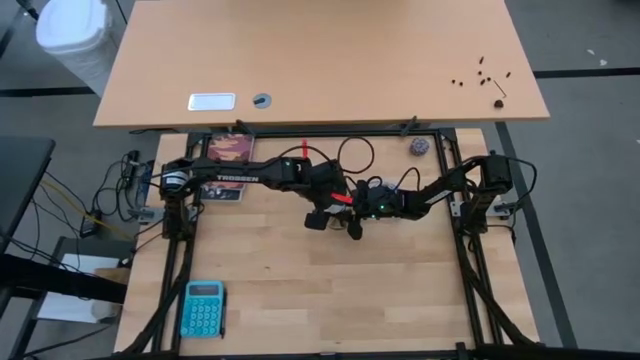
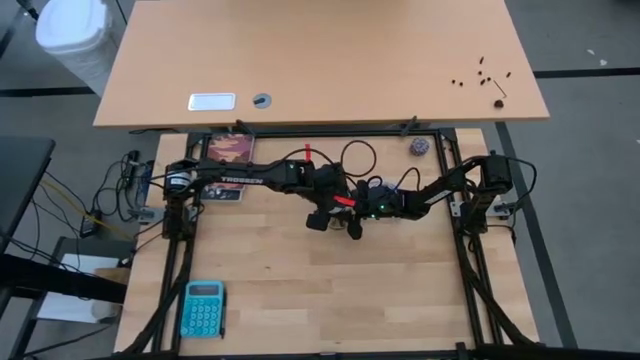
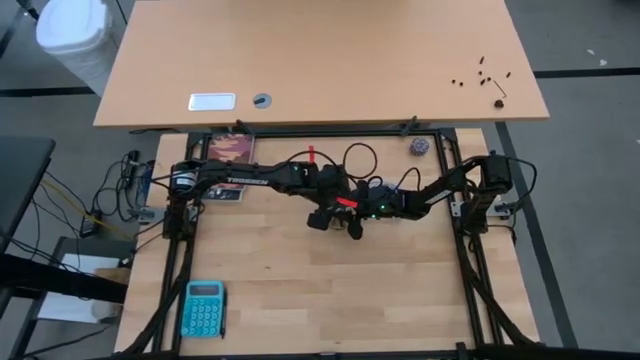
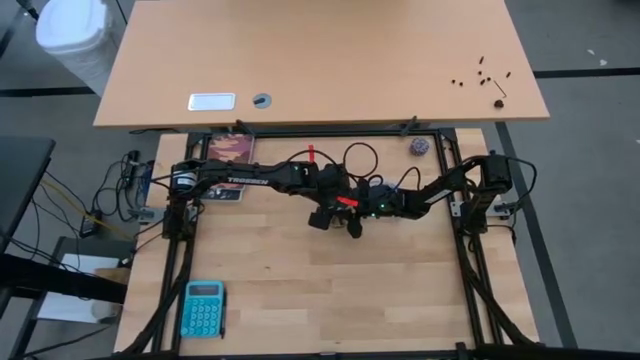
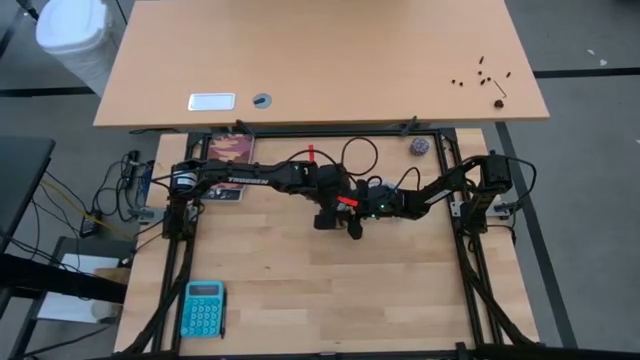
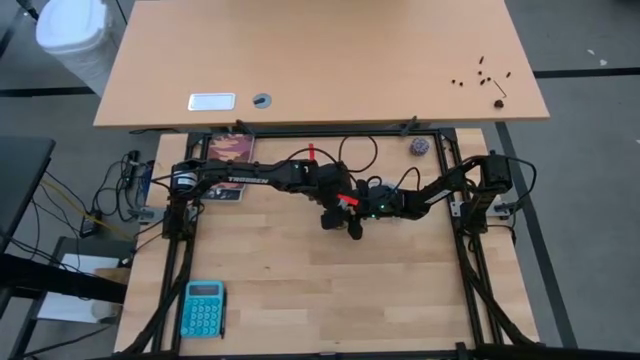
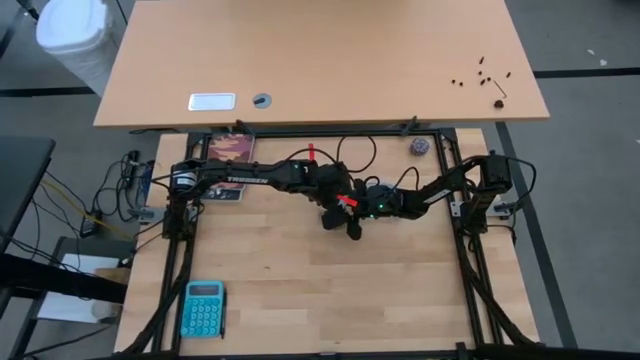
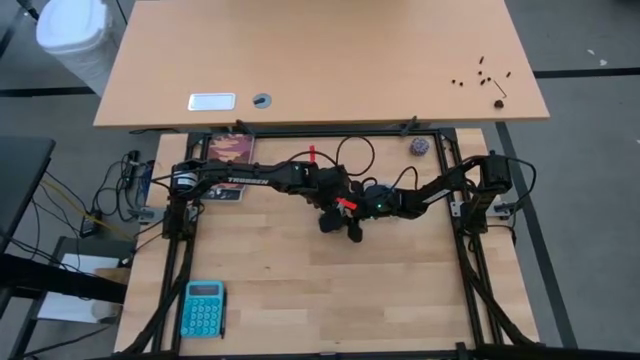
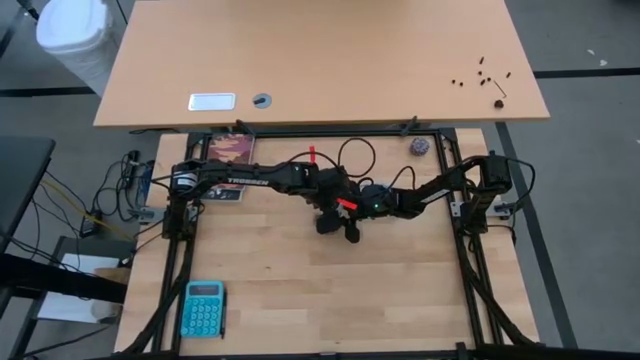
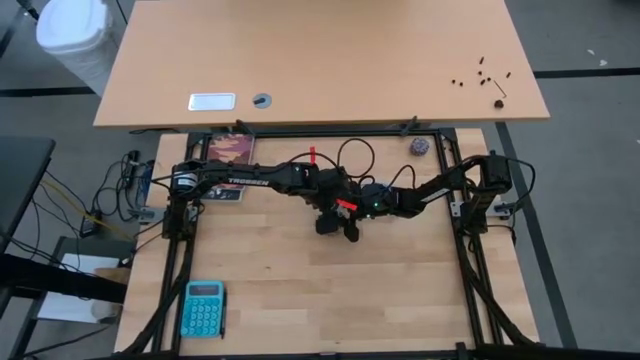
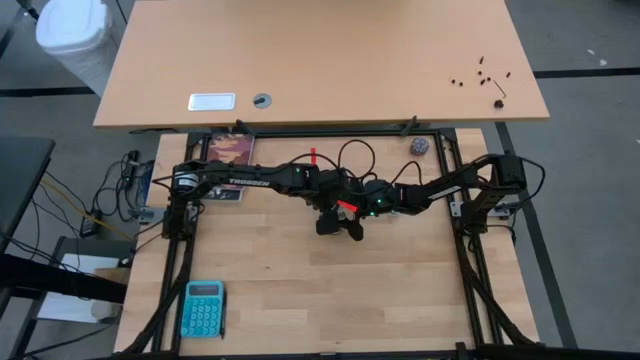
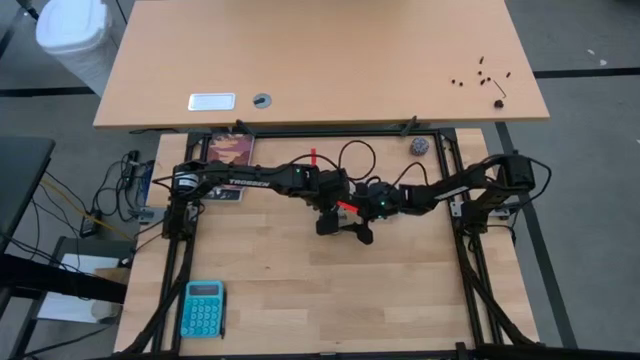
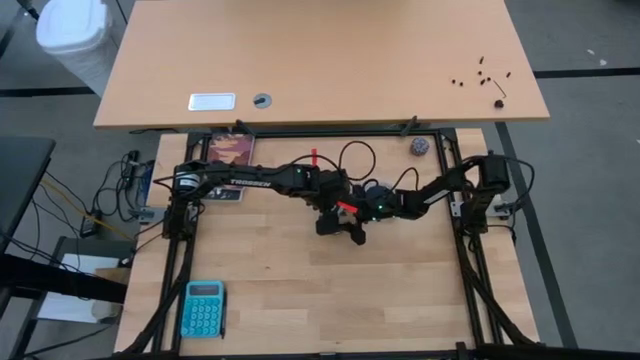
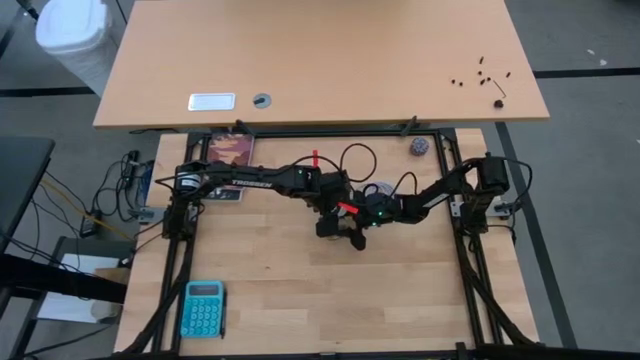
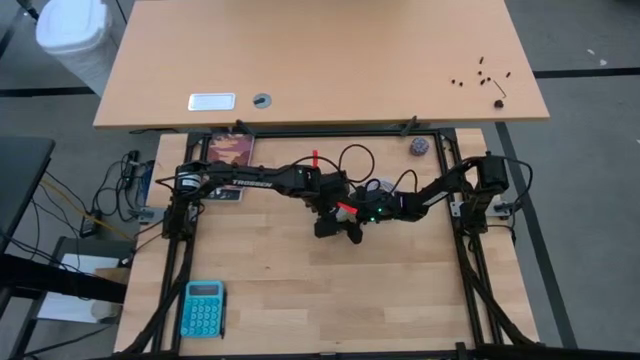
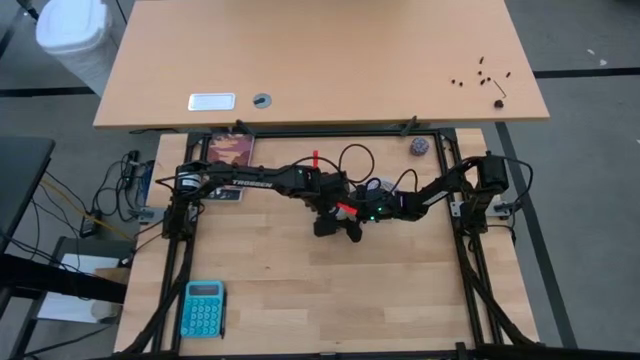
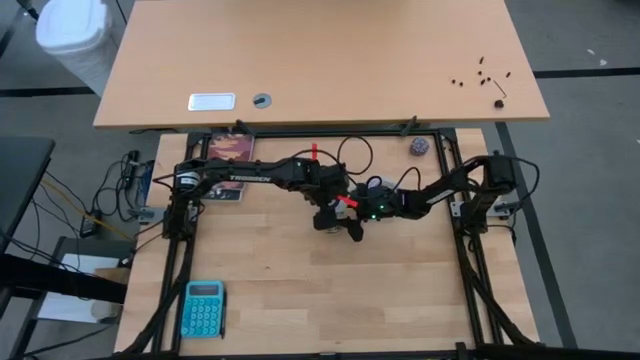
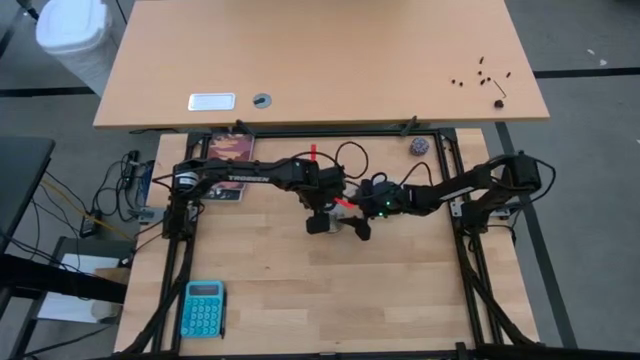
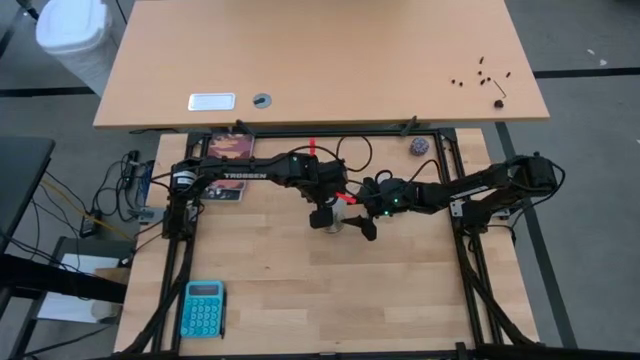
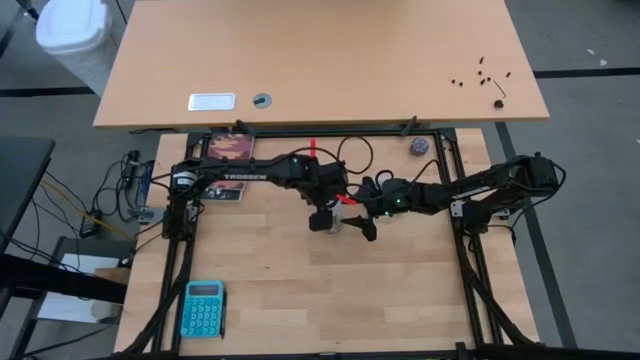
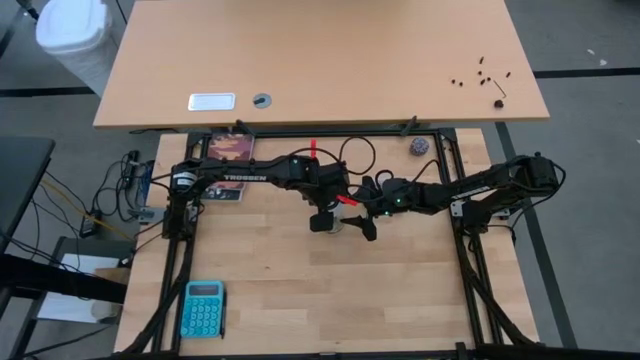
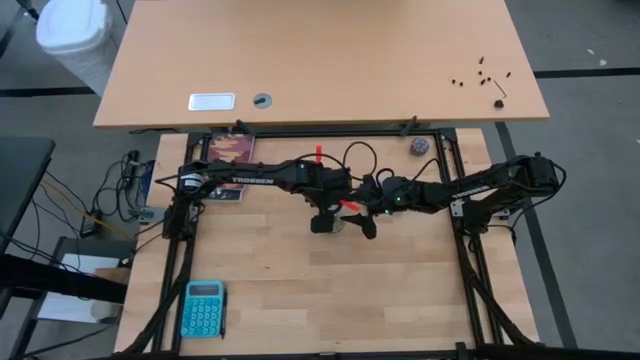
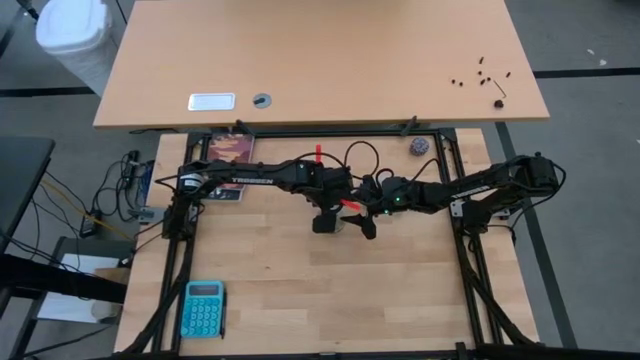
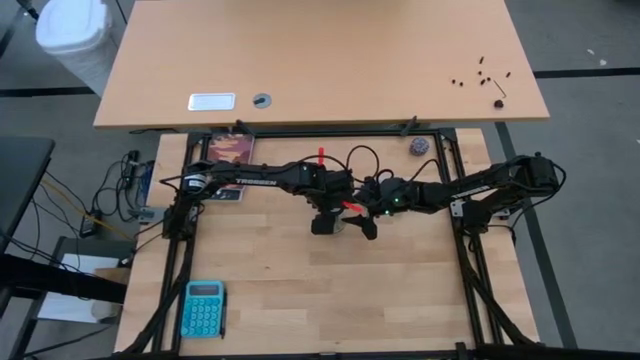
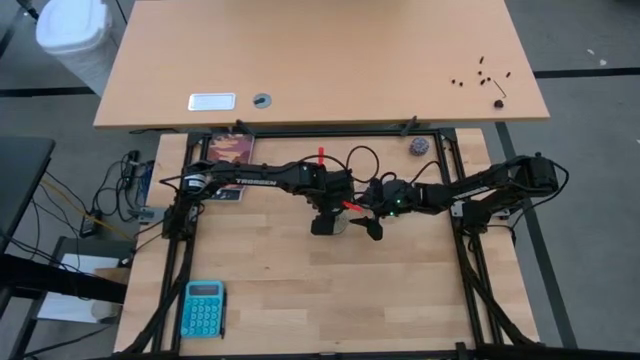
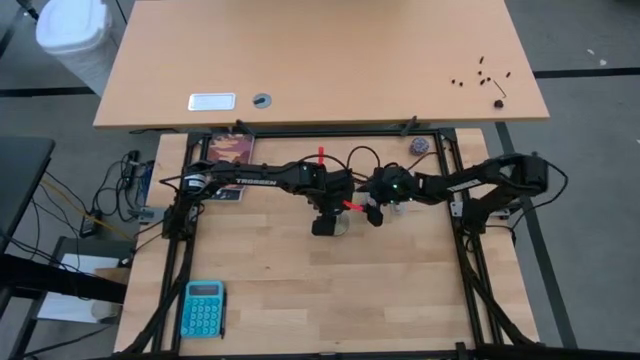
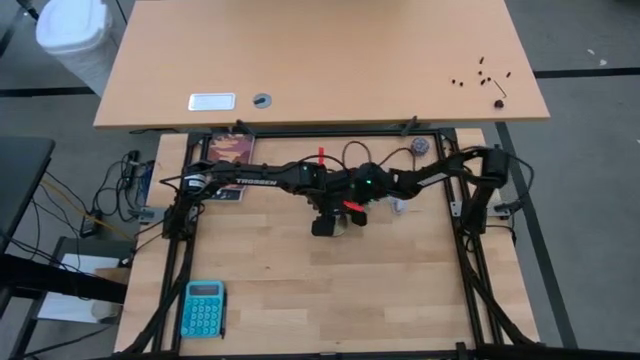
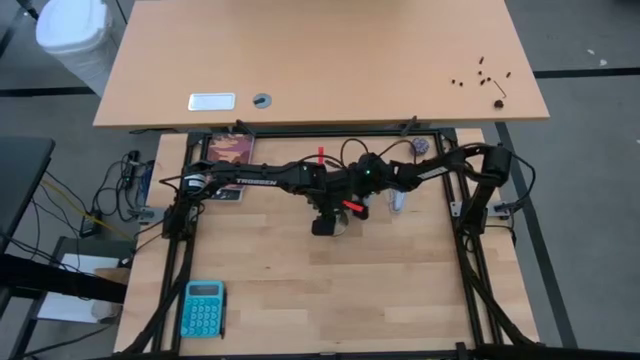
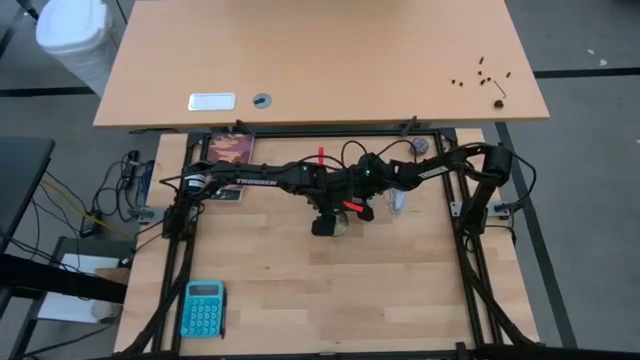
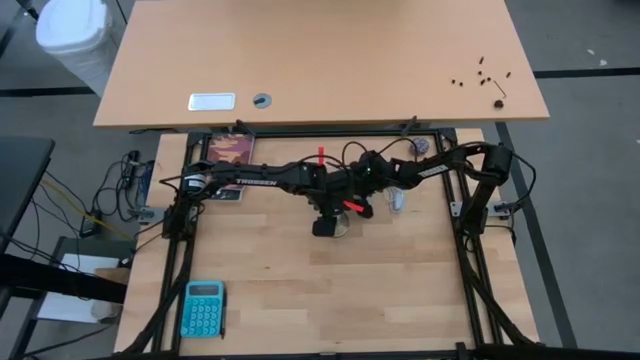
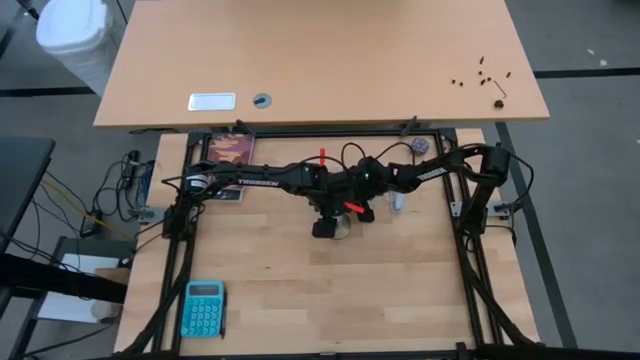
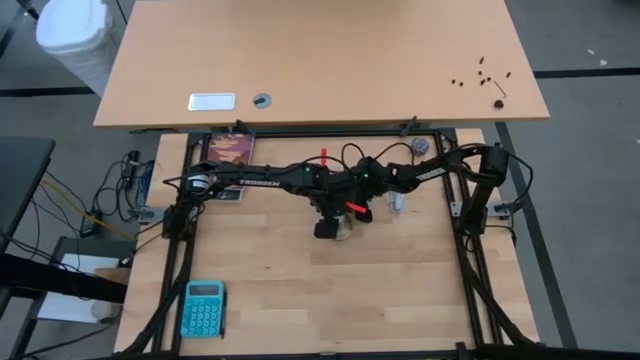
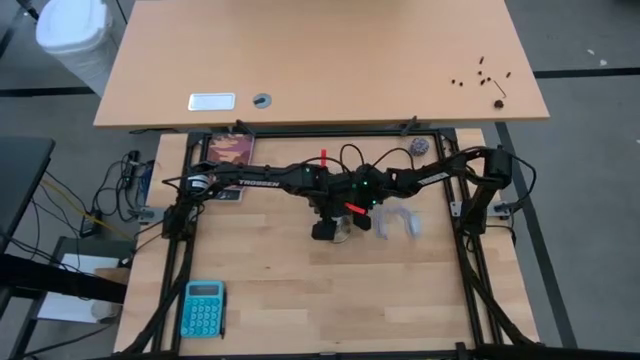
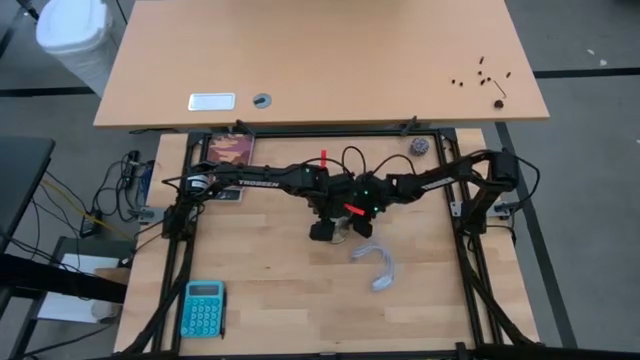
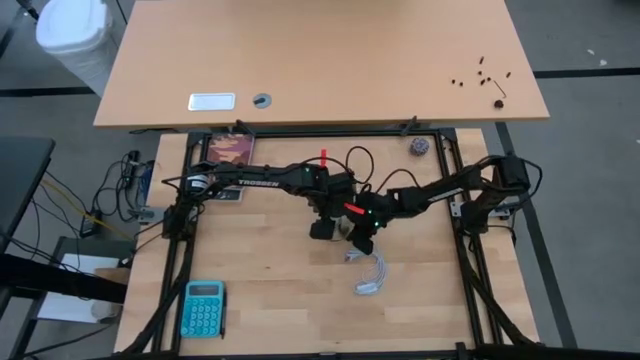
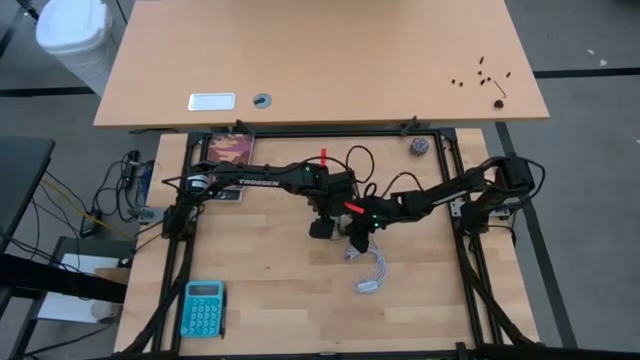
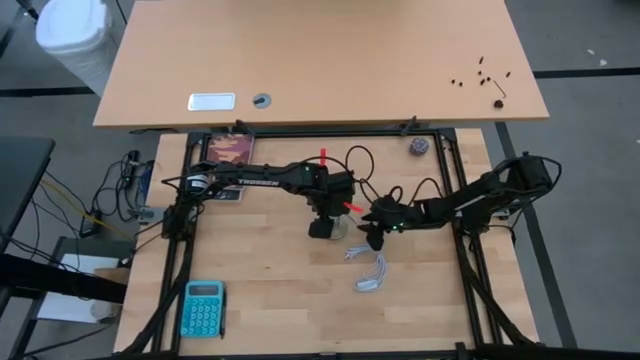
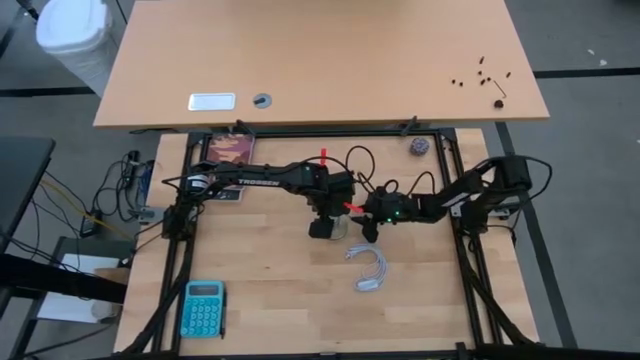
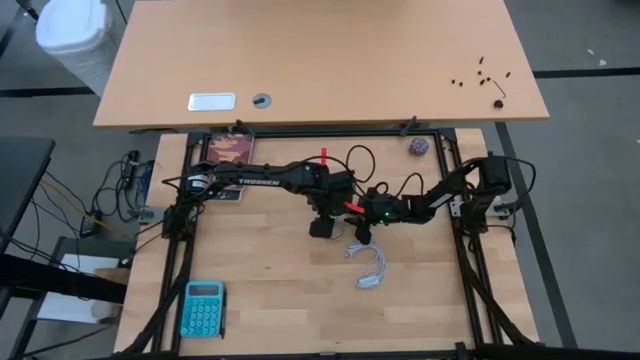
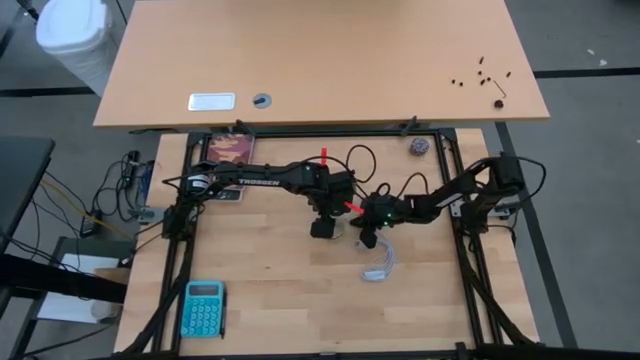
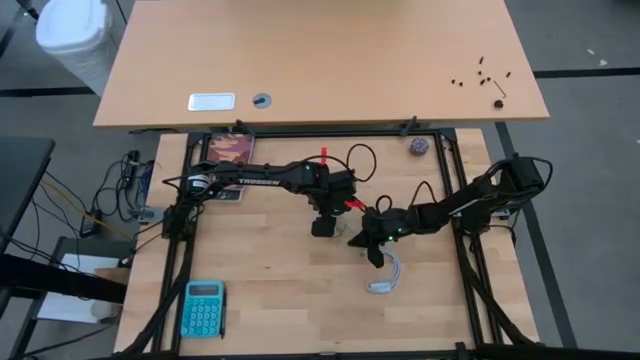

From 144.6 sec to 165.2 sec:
Task: Screw lightbulb
Insert the lightbulb into the desk lamp
